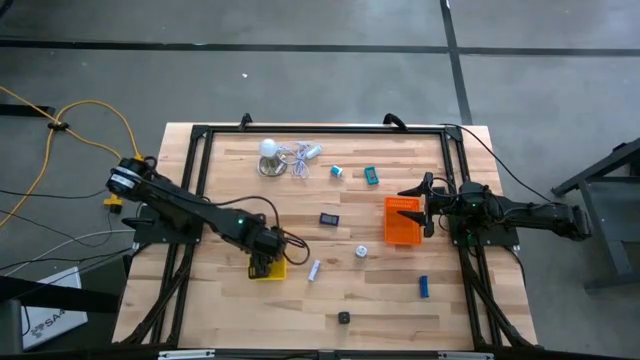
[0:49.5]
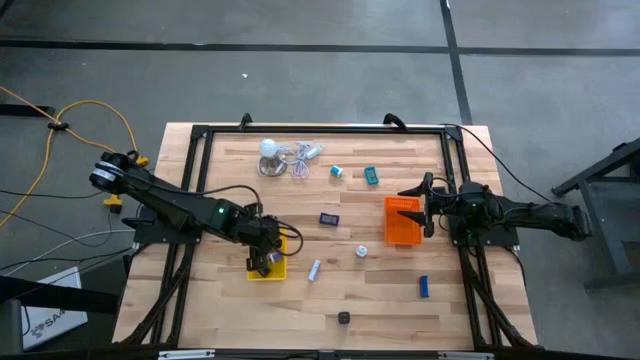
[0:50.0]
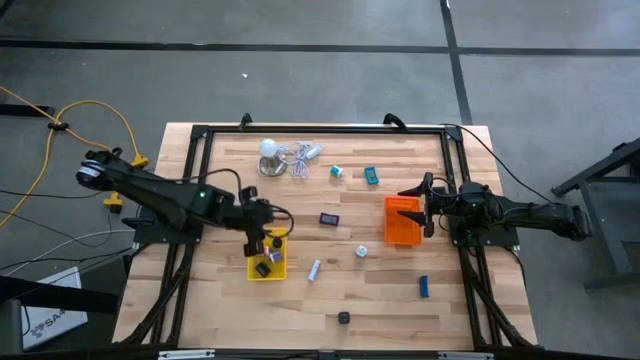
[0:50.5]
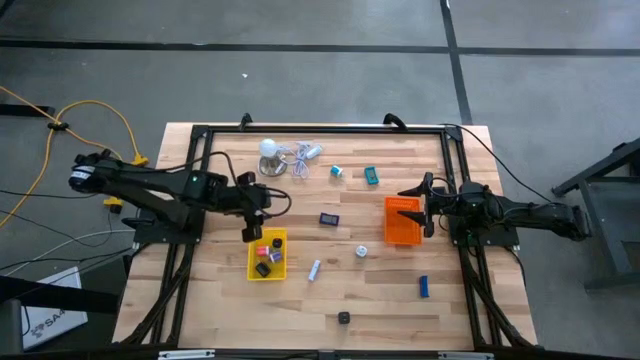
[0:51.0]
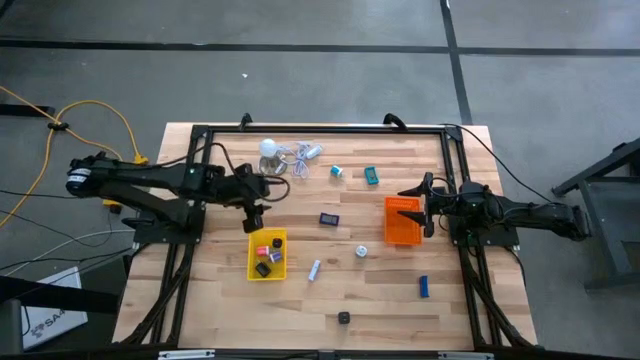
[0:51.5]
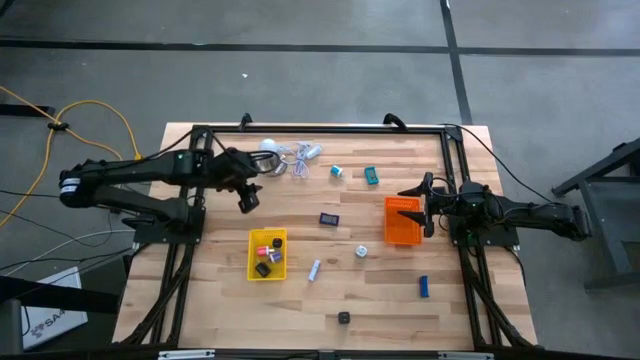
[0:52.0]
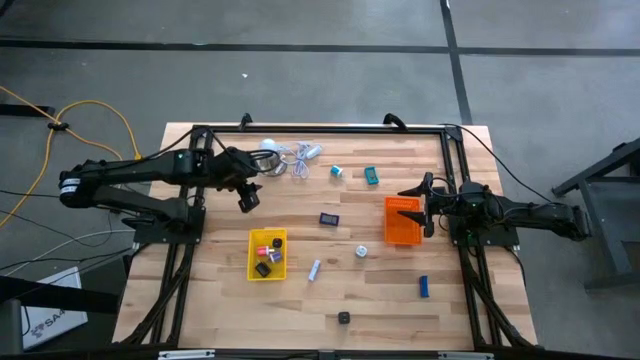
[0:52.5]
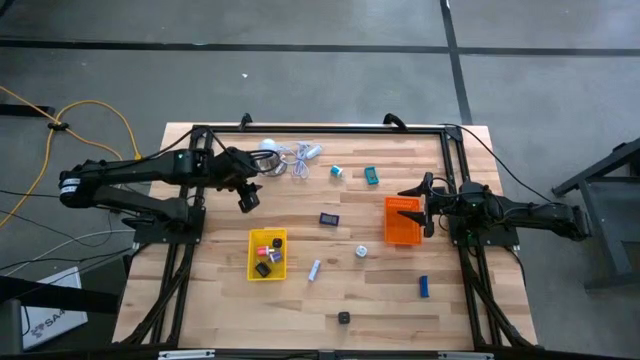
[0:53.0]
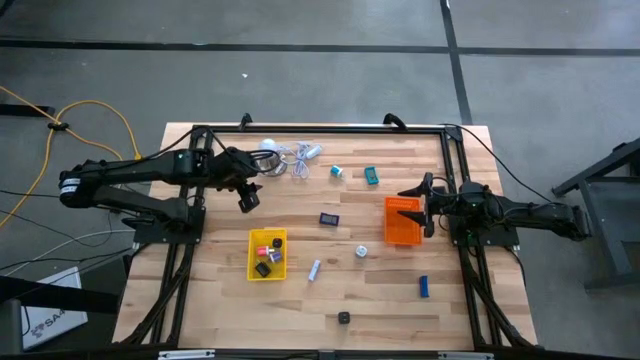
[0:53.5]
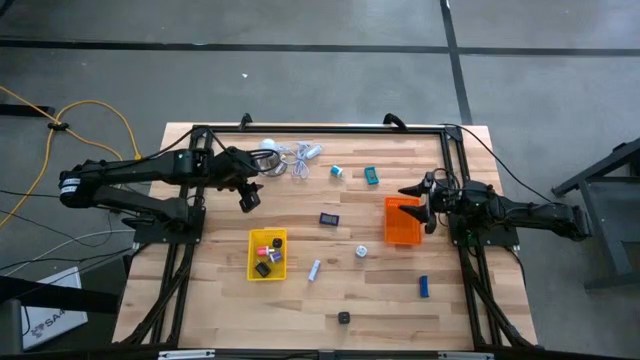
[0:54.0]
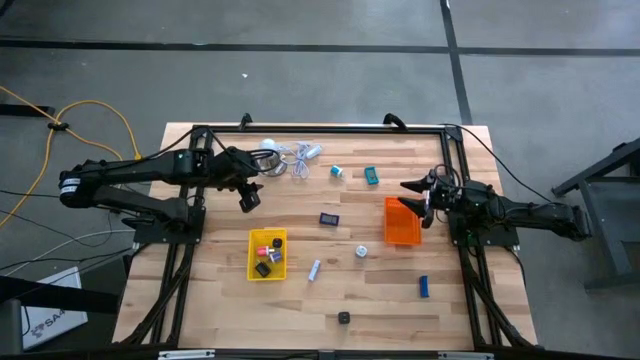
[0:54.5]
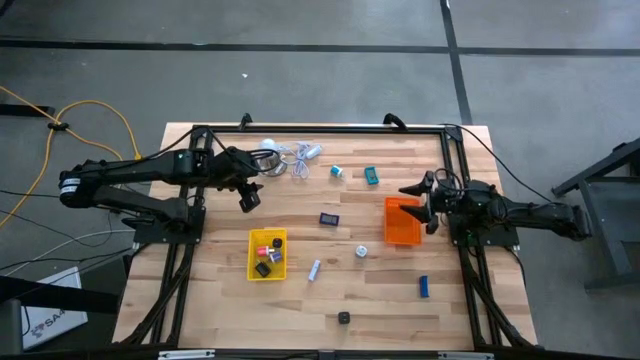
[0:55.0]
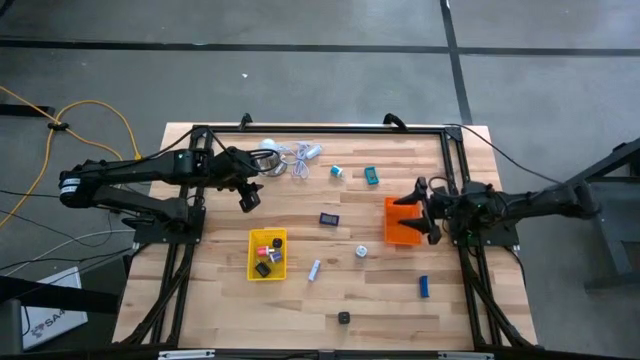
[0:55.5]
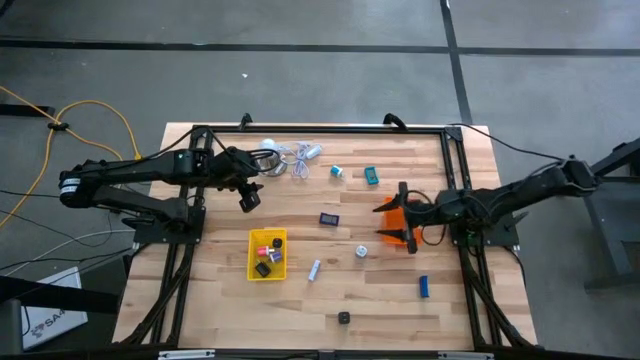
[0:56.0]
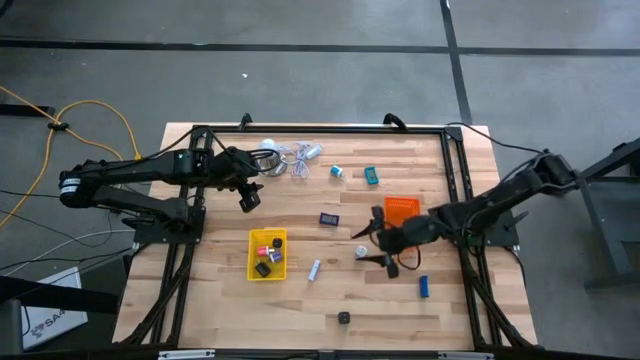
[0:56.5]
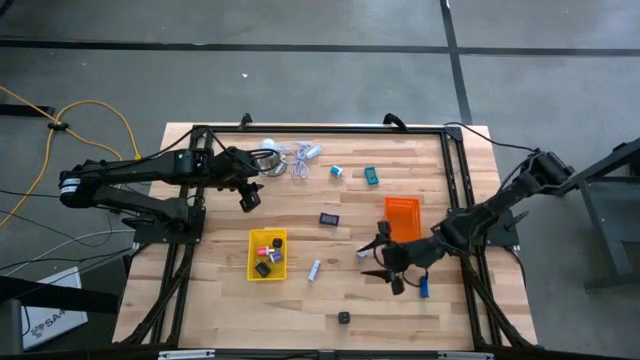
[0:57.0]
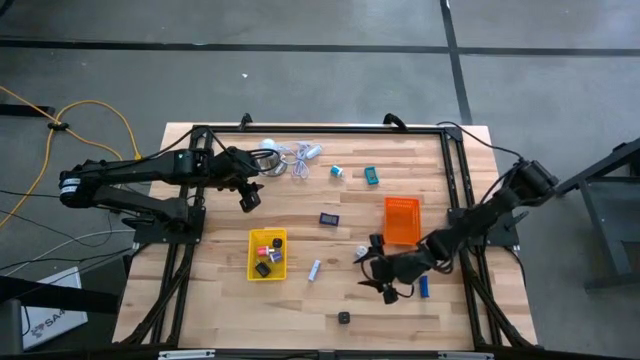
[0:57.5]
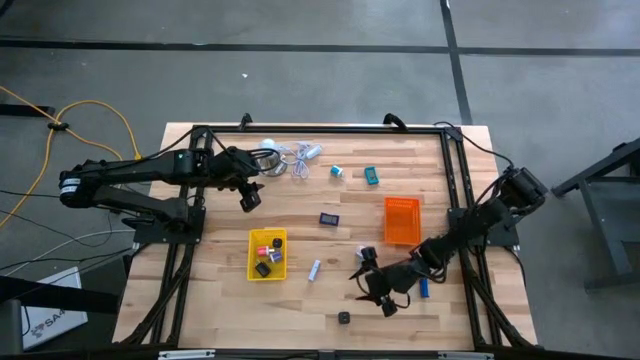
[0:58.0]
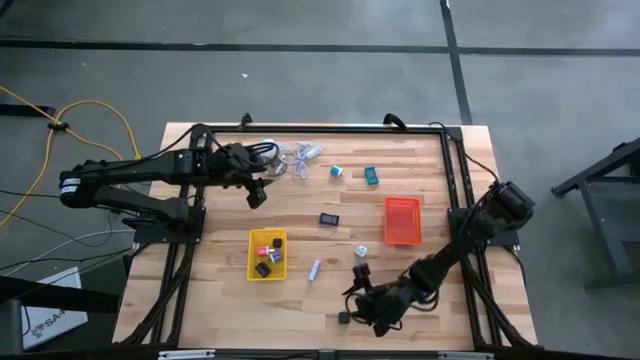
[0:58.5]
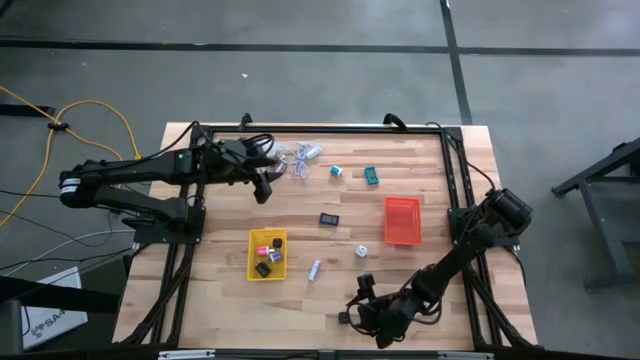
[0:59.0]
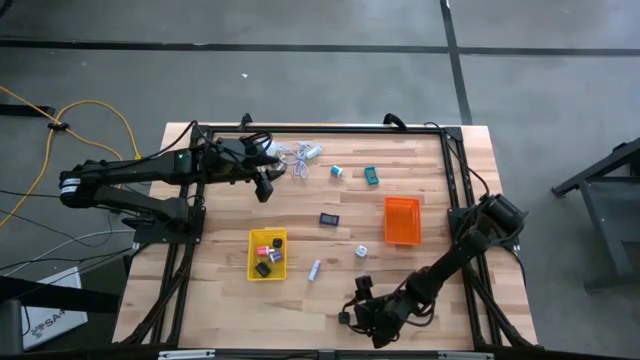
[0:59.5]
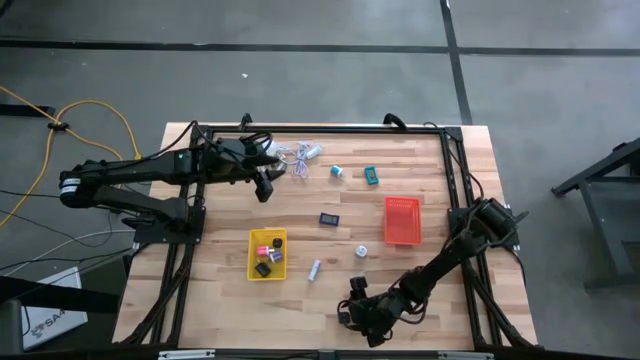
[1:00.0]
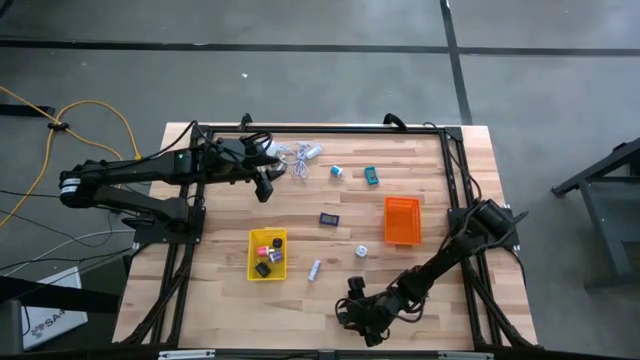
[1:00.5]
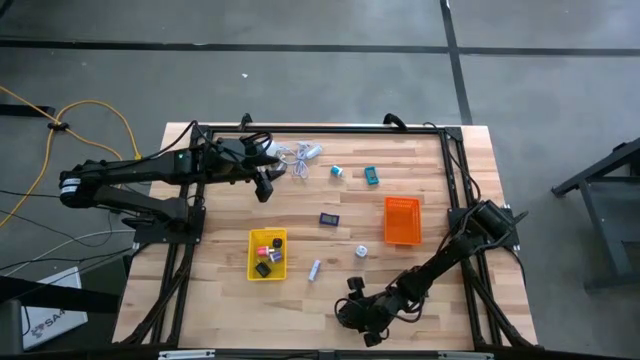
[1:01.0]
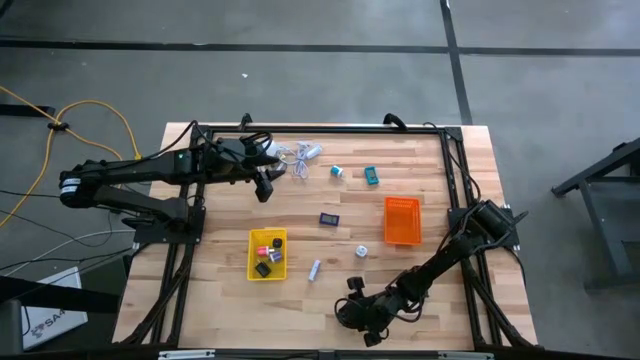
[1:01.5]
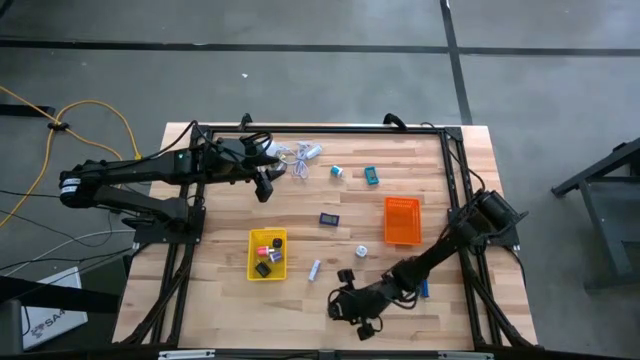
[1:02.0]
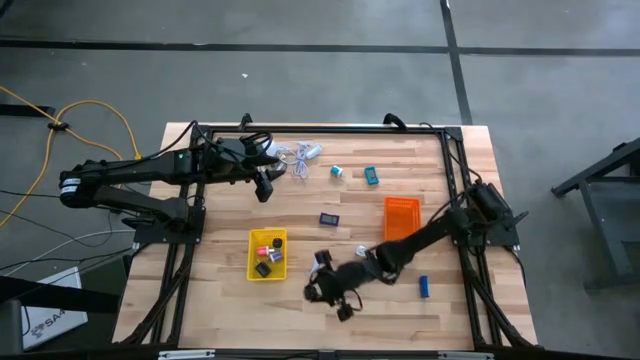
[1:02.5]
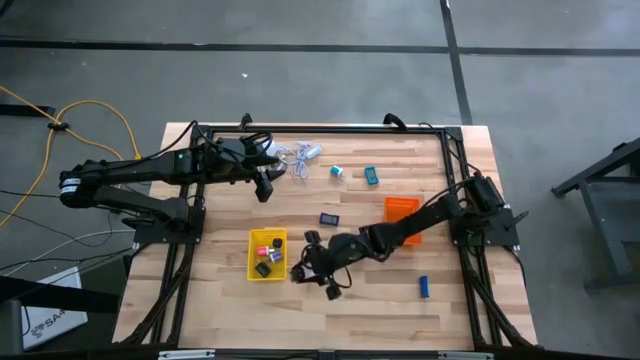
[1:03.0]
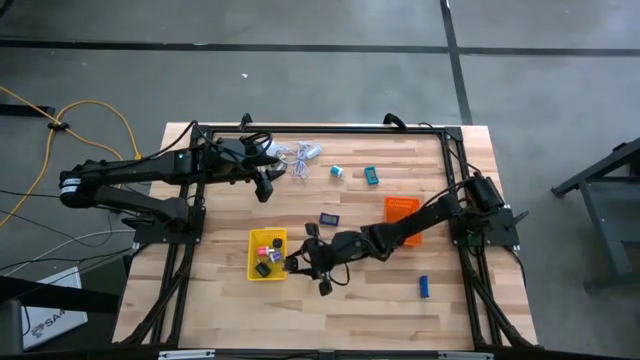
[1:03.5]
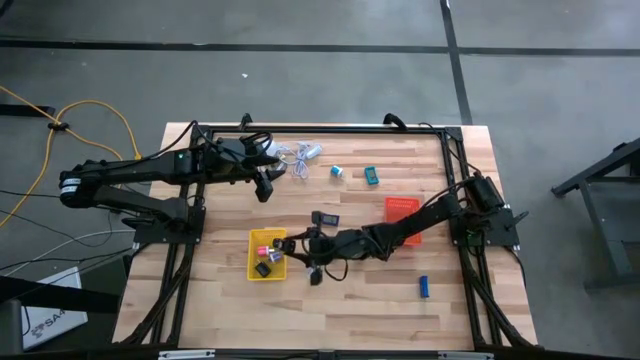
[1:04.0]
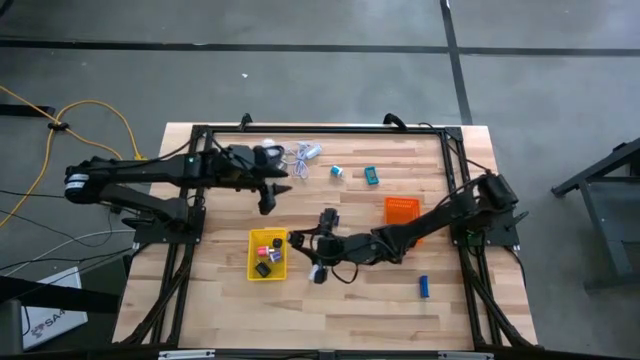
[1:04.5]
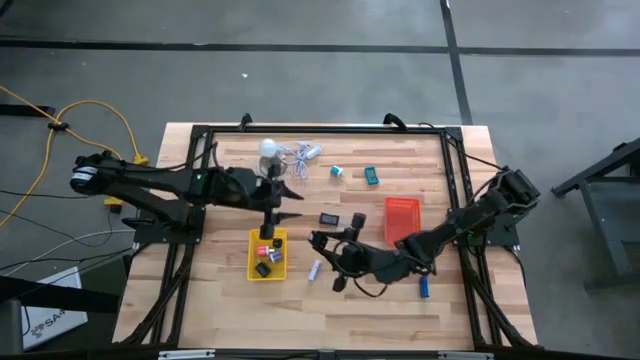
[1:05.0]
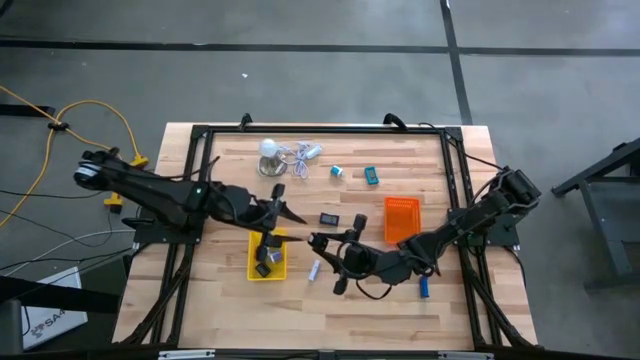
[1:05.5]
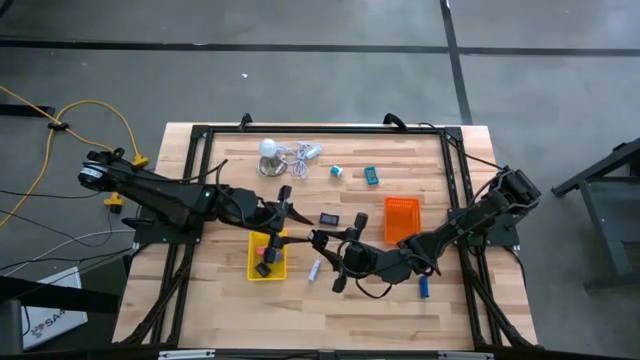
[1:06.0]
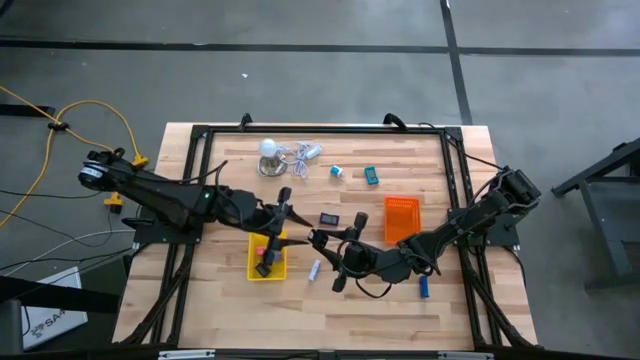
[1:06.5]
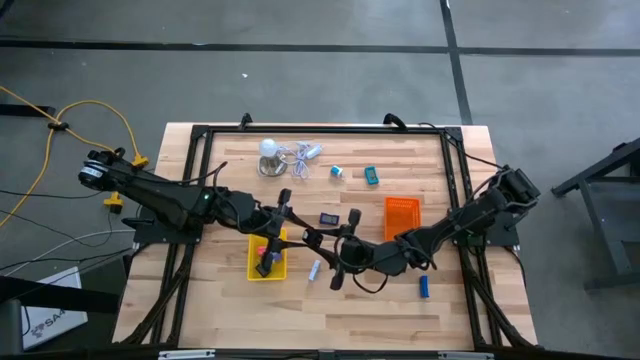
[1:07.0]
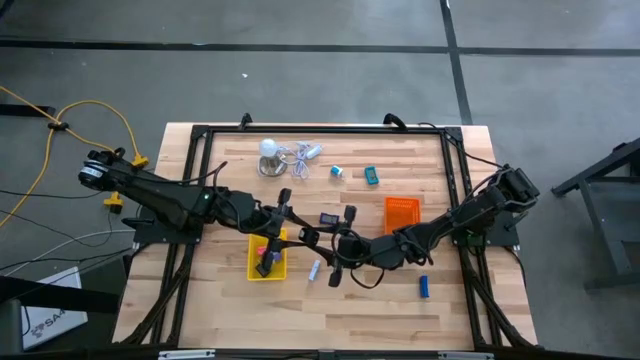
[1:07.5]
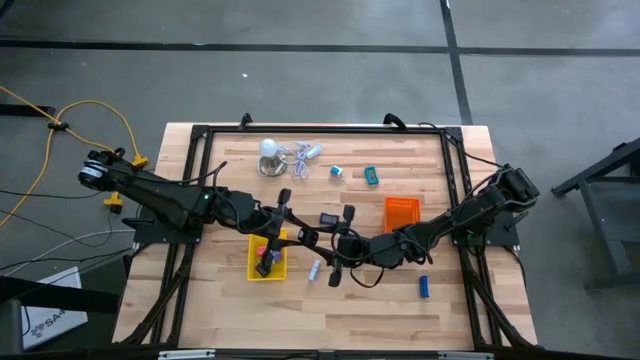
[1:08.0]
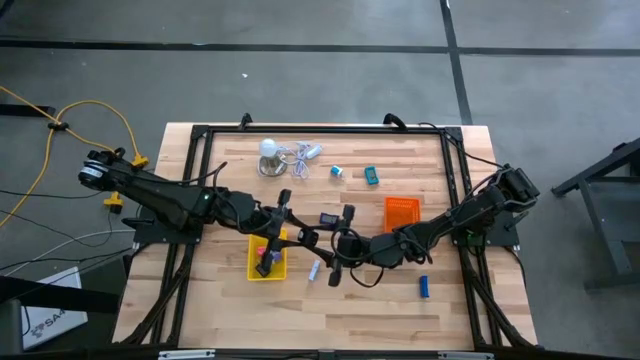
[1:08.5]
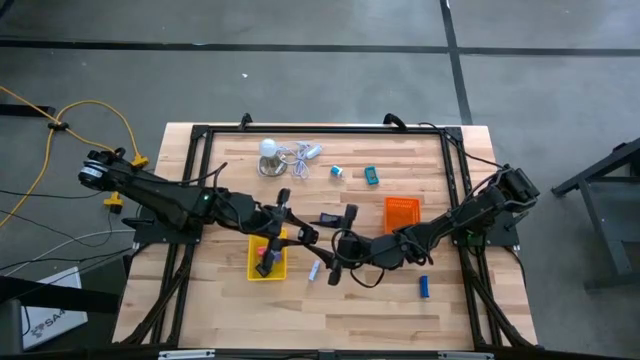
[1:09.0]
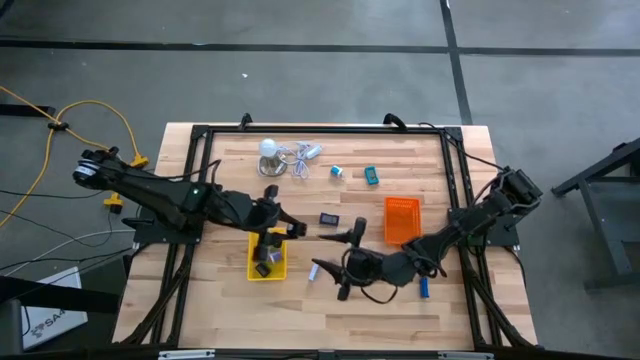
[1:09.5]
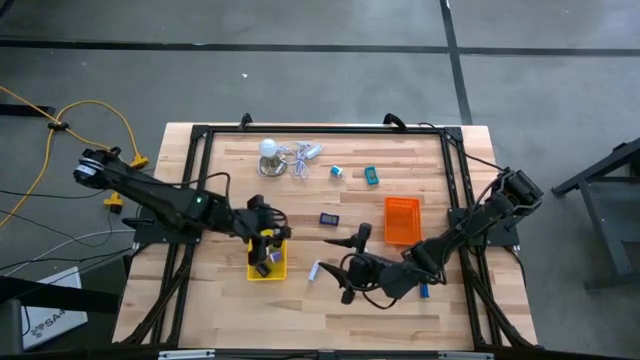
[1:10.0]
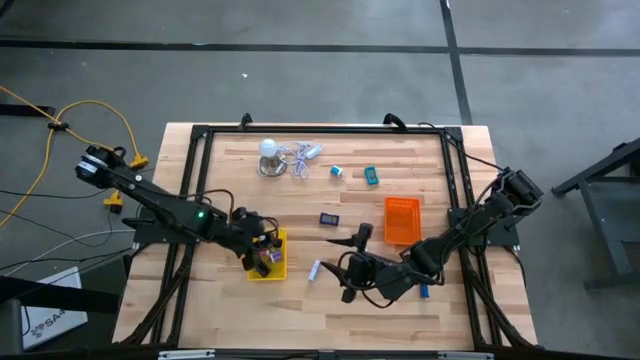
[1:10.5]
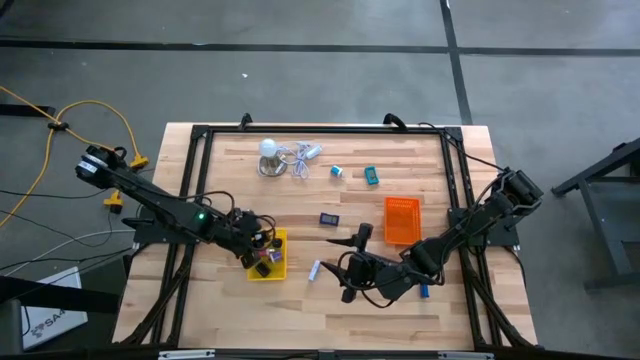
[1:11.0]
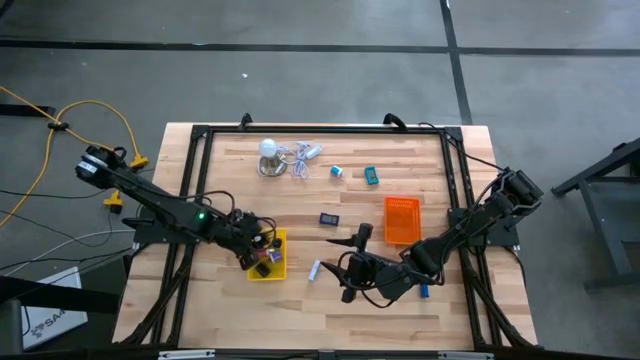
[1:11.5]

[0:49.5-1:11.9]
Task: Pick & Place Office items
Put the black charger adapter into the yellow bin
